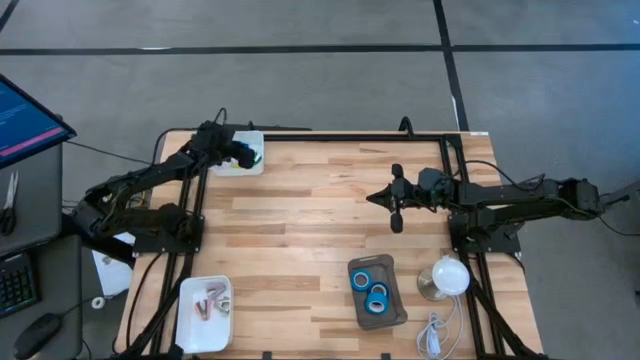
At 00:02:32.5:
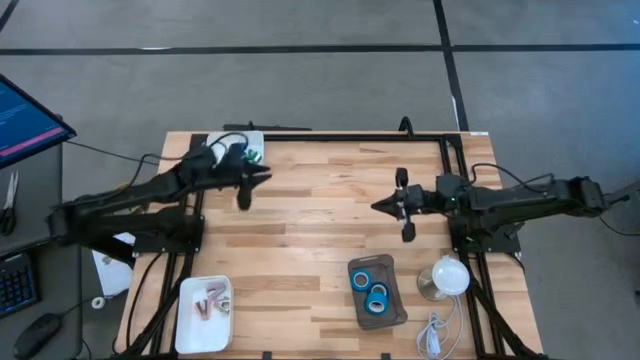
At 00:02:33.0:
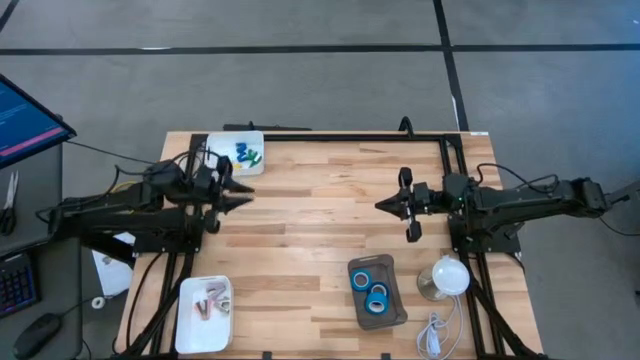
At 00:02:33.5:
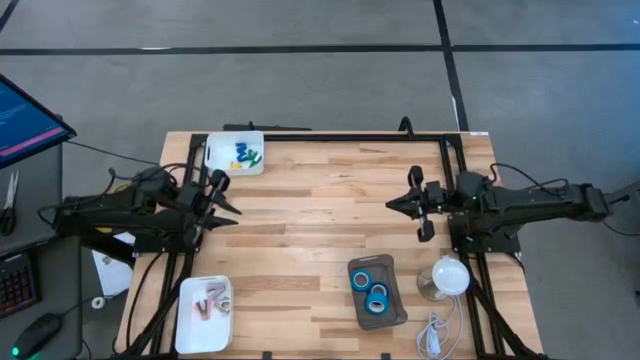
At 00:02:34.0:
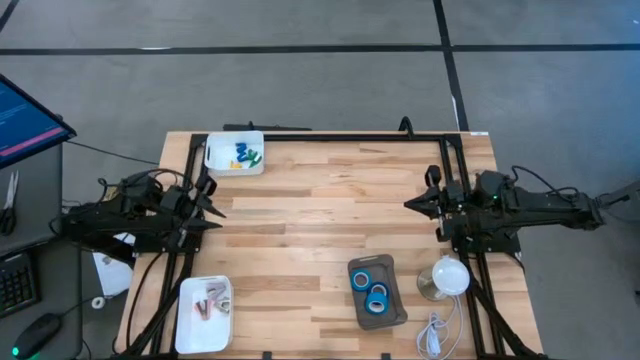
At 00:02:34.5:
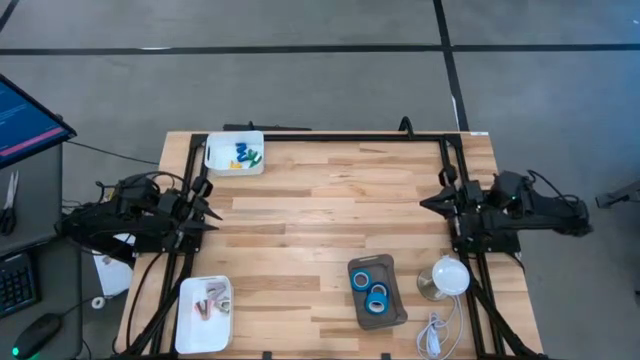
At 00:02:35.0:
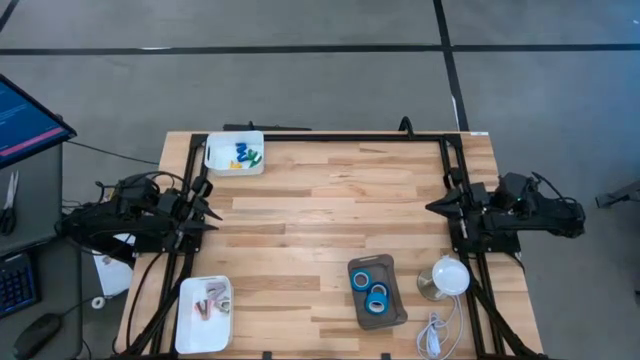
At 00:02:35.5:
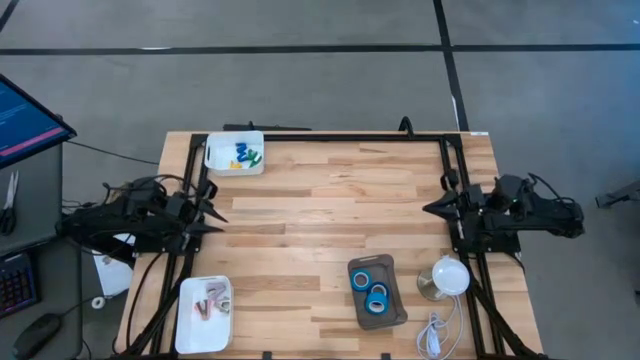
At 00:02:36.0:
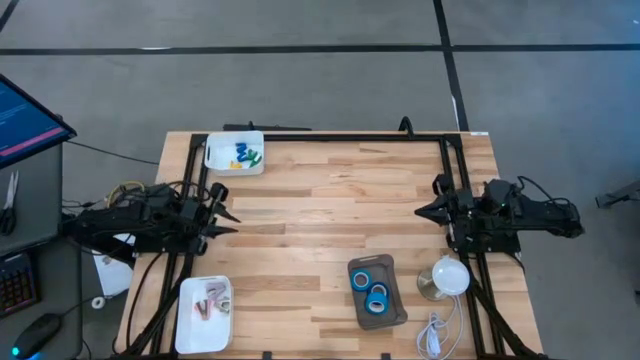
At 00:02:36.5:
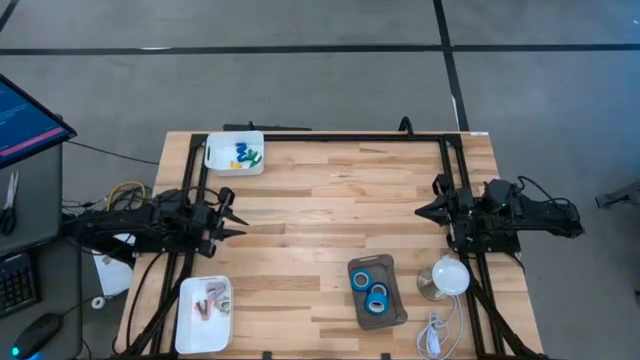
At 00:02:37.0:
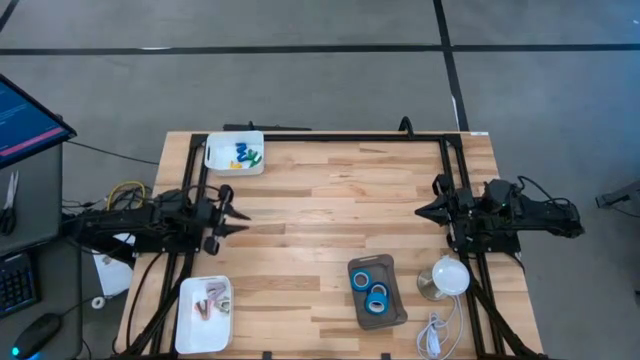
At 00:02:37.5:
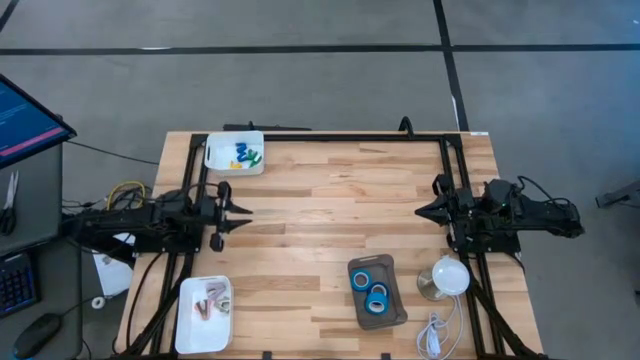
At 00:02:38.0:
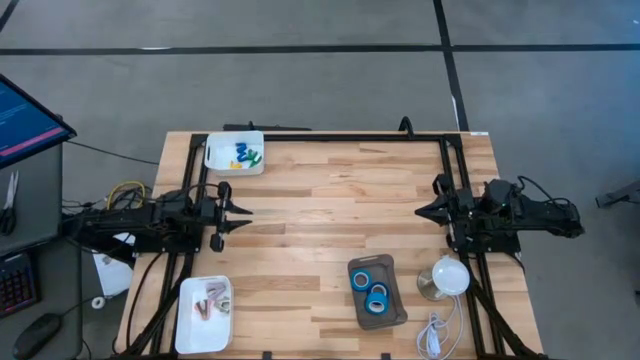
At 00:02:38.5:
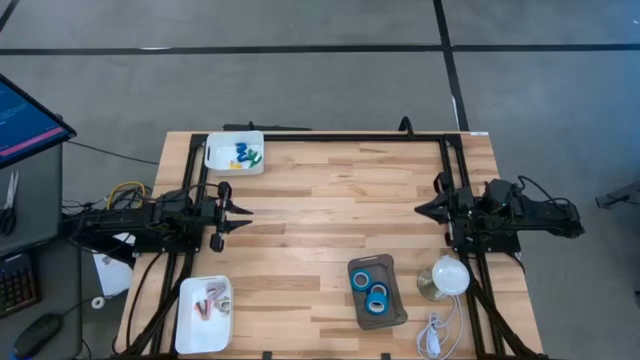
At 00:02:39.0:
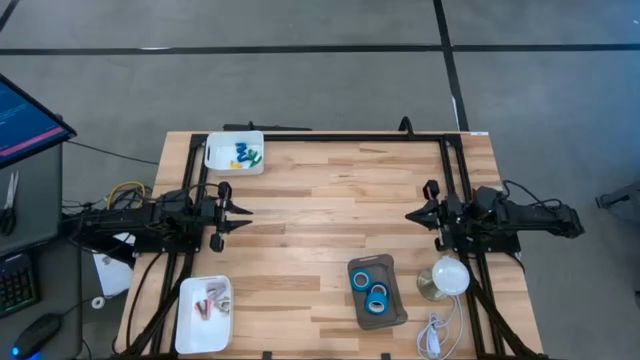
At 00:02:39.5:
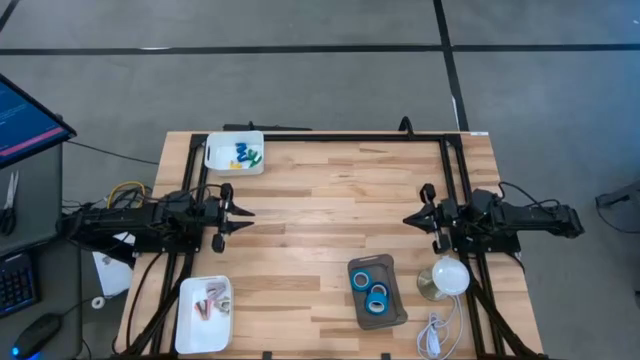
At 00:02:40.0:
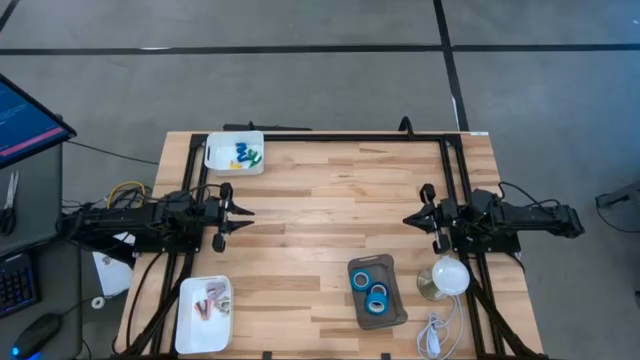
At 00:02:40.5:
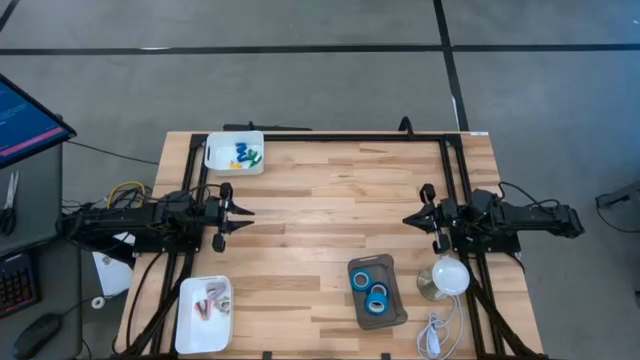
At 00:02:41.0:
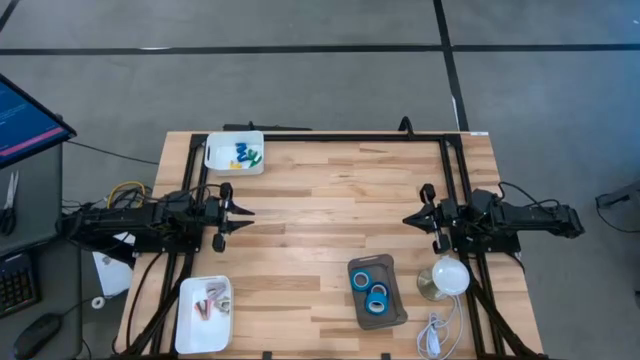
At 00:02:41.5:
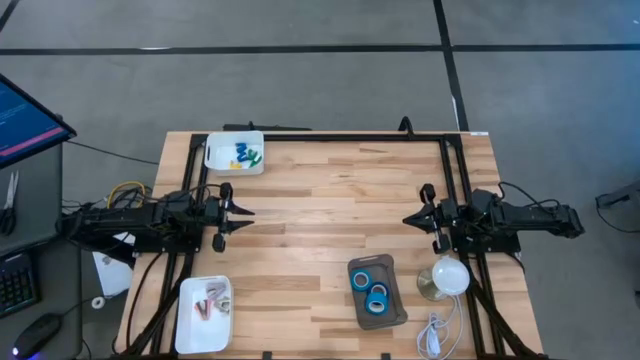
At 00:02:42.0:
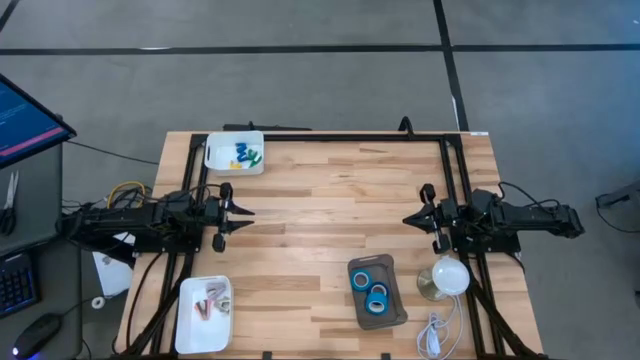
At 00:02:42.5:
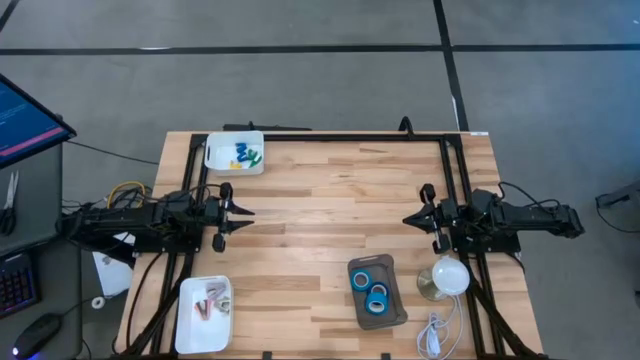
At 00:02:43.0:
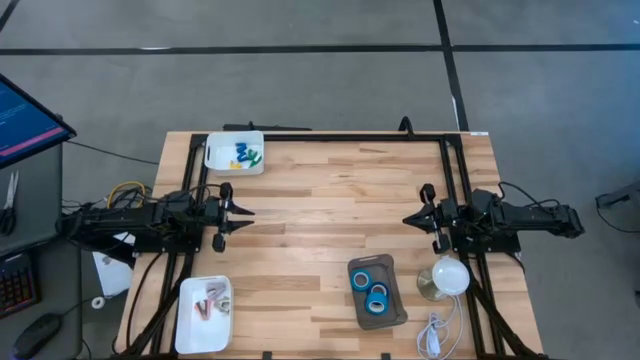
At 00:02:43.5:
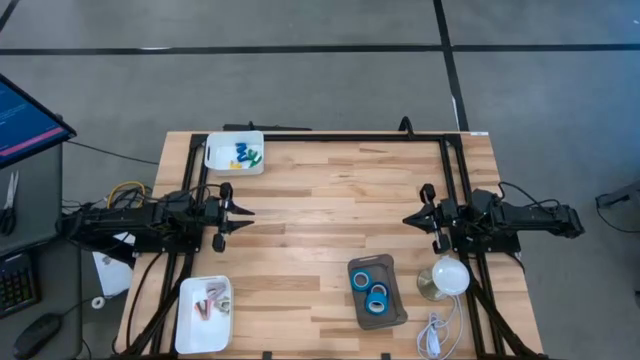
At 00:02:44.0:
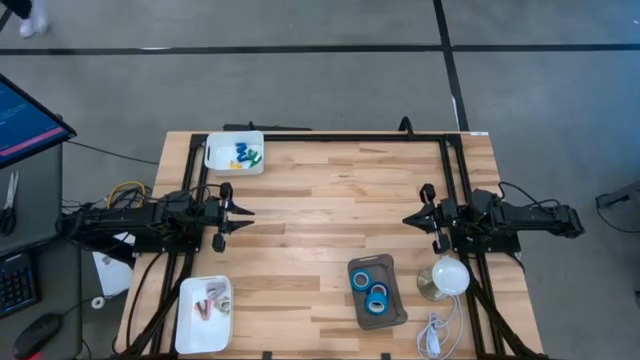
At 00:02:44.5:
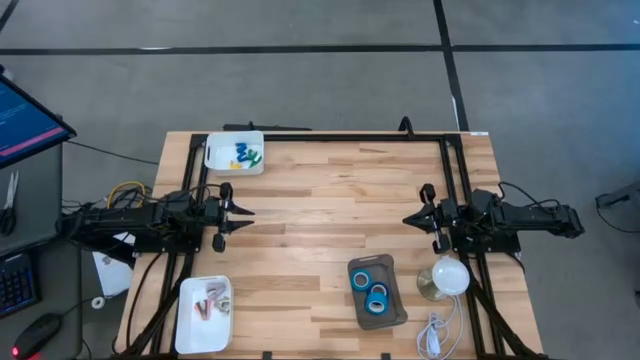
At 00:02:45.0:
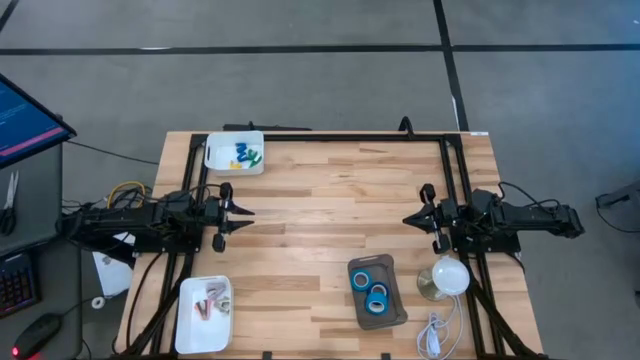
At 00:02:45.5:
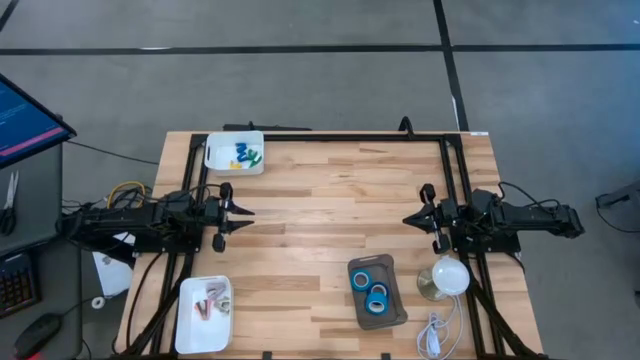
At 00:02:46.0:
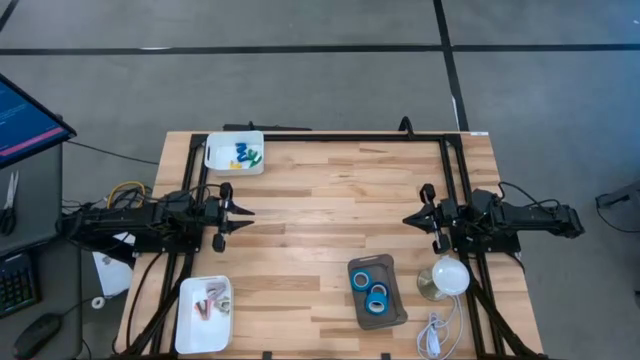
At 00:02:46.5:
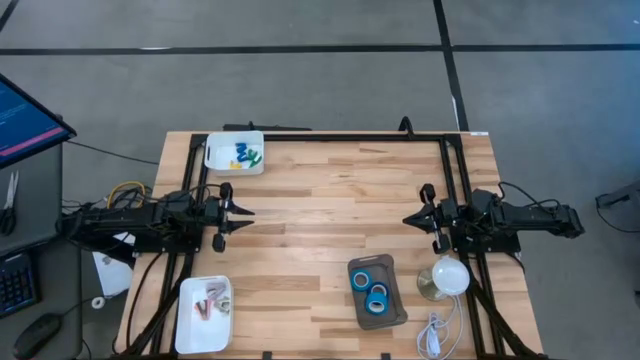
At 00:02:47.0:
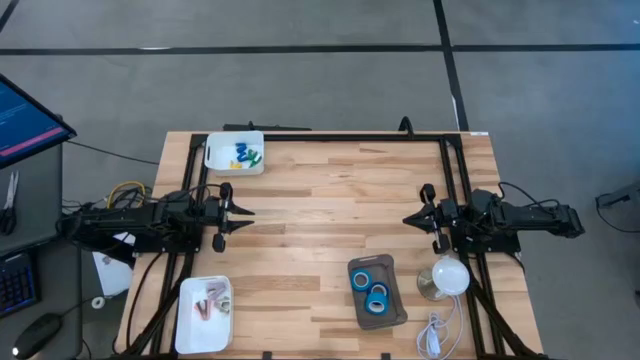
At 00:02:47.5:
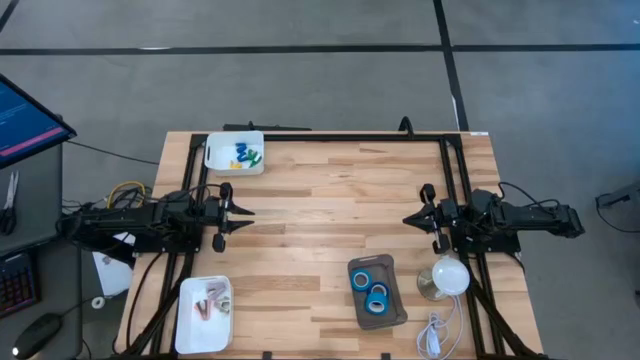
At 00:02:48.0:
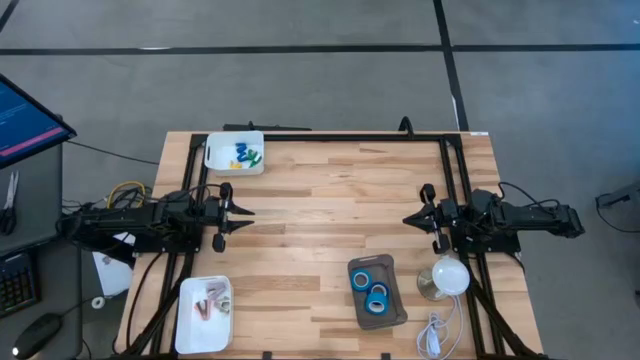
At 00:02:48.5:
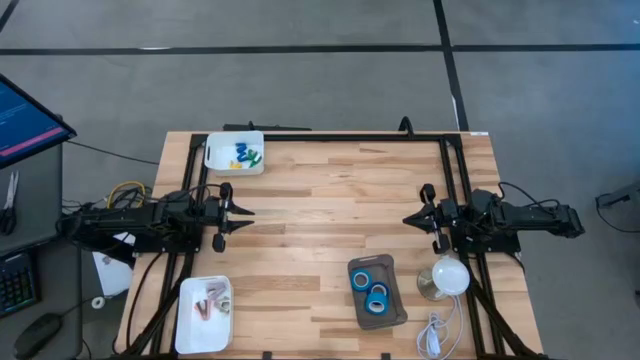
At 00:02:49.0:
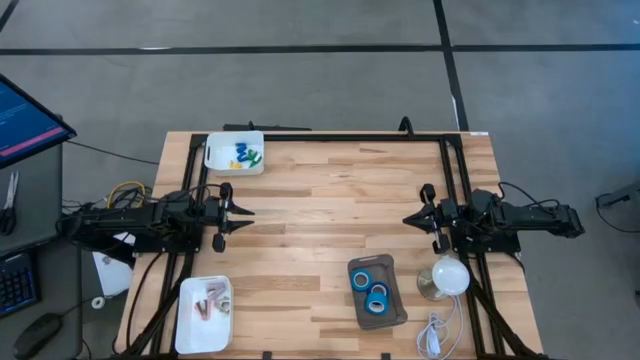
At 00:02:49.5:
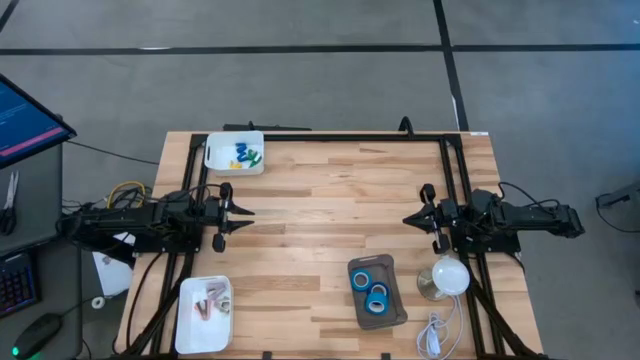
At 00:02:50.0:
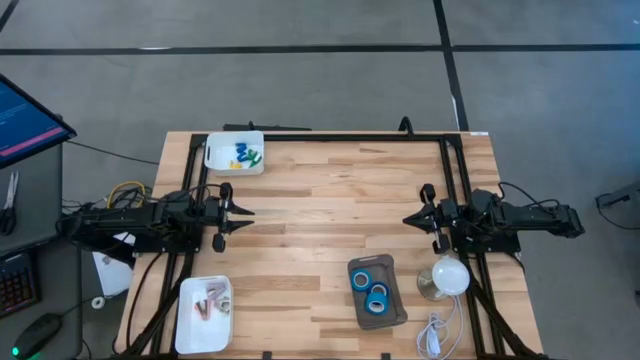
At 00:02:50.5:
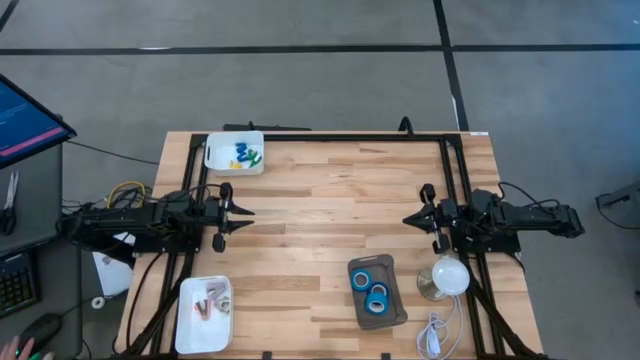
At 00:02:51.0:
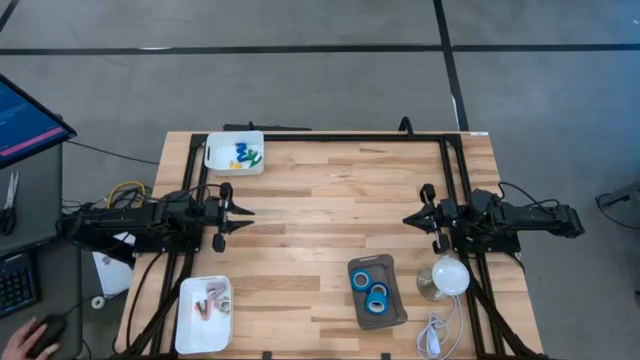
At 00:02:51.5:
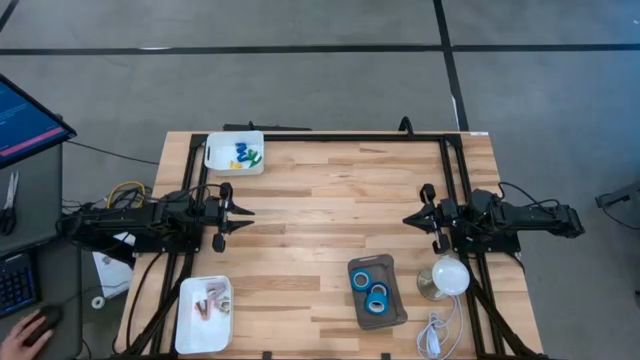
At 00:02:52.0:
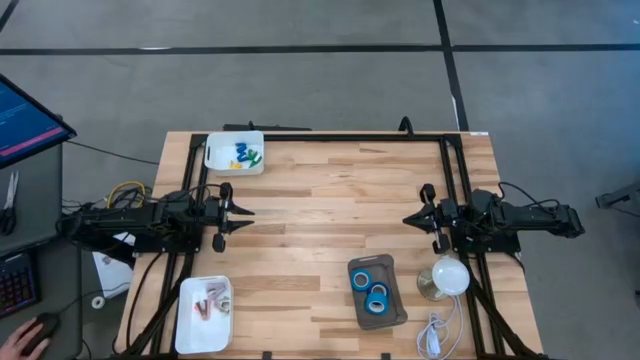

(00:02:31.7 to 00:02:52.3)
Task: Pick and place Stapler, Stapler remover, tape
Return to Home Position
